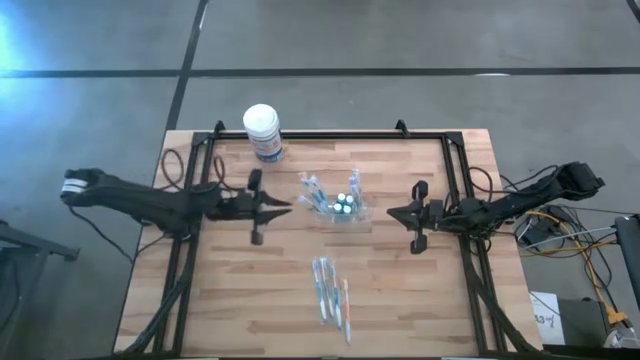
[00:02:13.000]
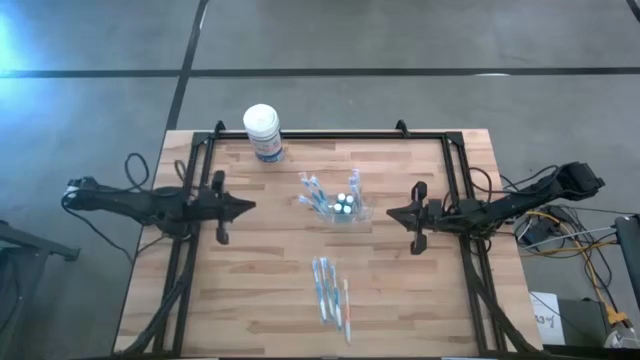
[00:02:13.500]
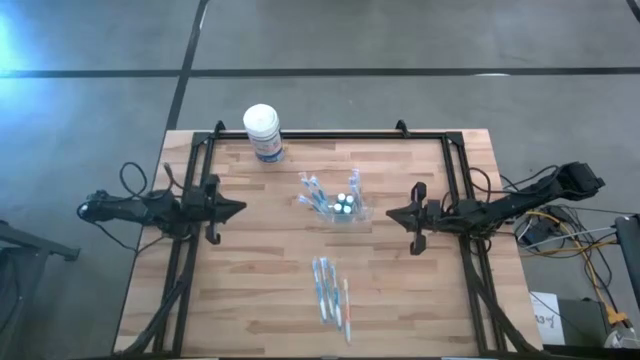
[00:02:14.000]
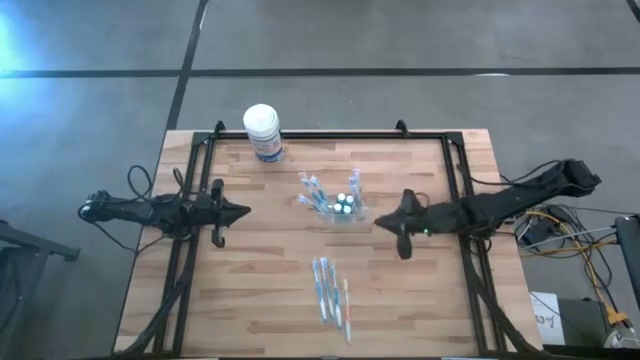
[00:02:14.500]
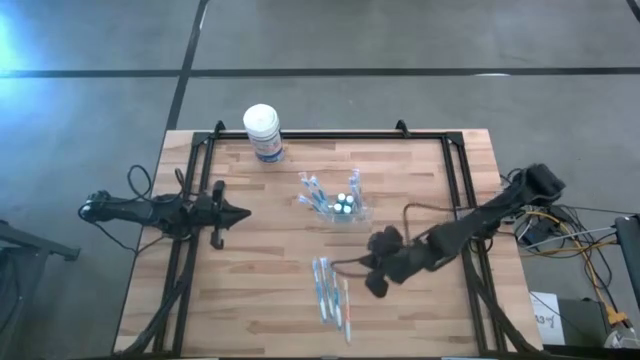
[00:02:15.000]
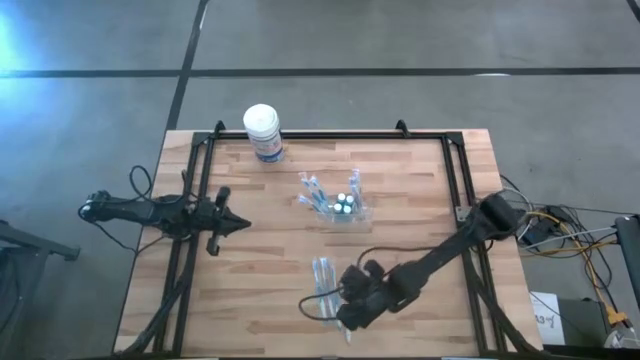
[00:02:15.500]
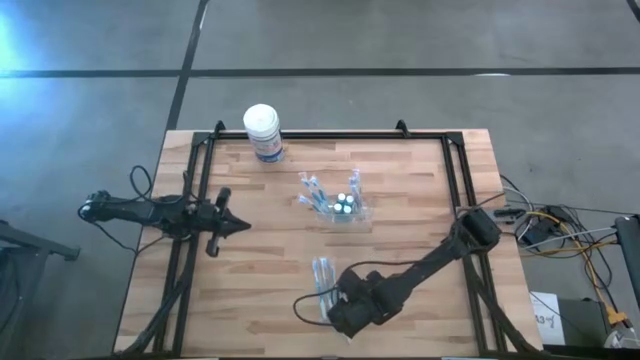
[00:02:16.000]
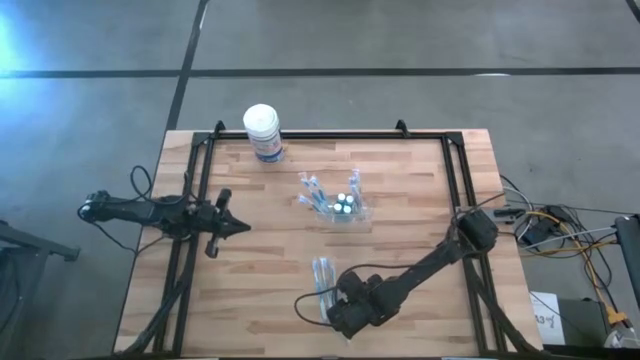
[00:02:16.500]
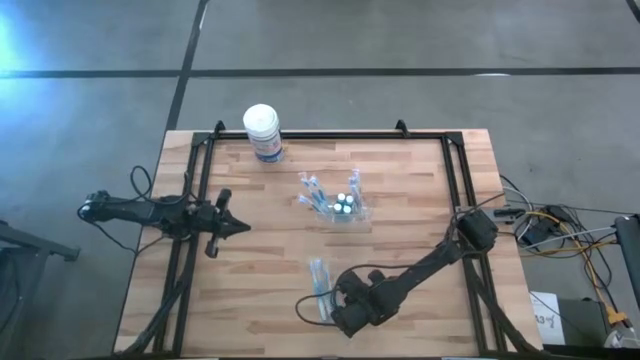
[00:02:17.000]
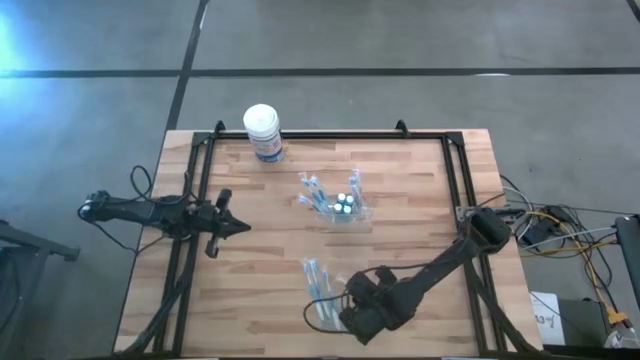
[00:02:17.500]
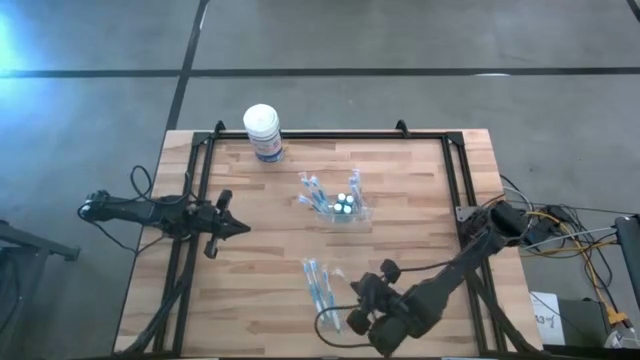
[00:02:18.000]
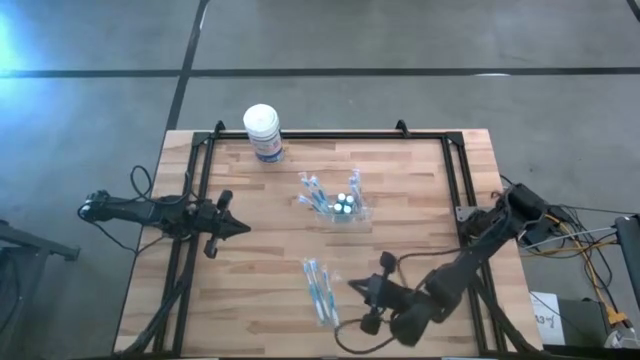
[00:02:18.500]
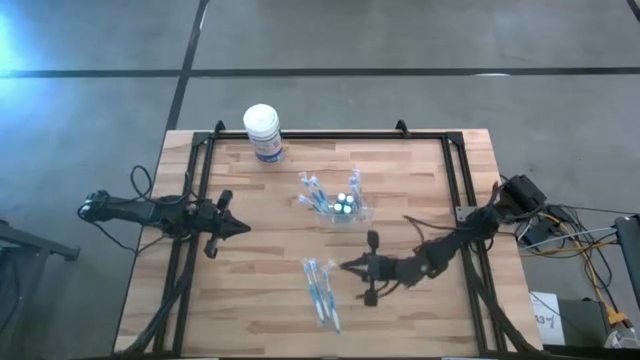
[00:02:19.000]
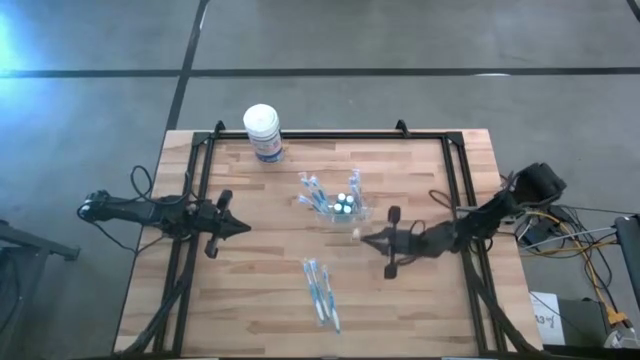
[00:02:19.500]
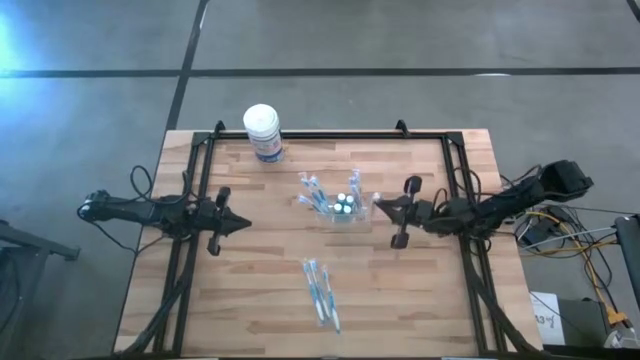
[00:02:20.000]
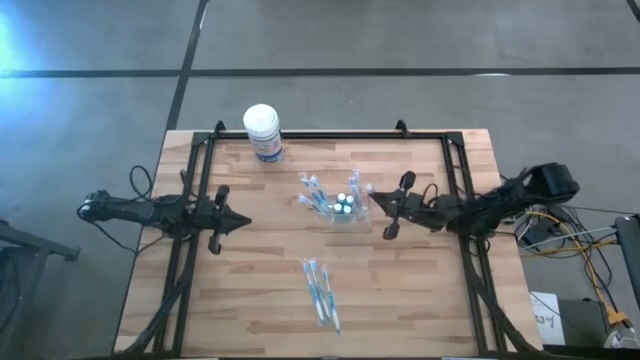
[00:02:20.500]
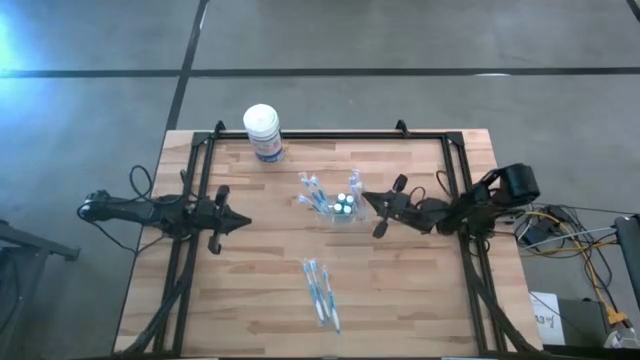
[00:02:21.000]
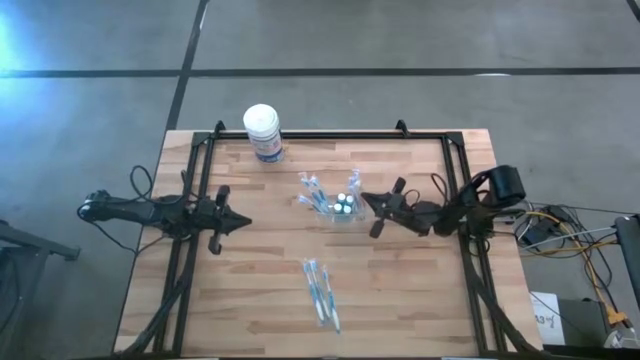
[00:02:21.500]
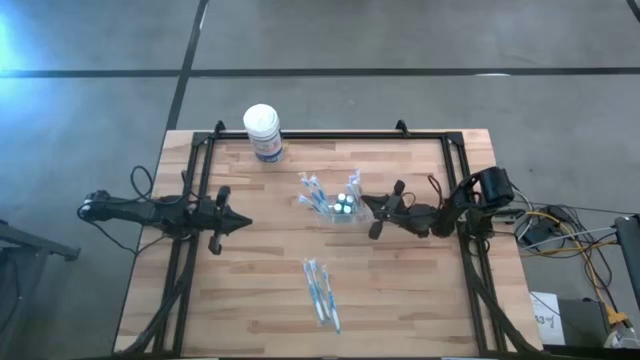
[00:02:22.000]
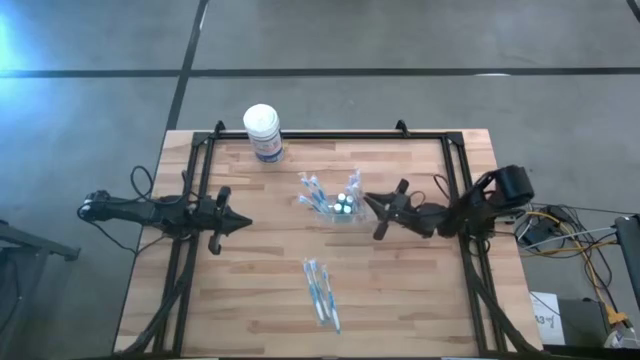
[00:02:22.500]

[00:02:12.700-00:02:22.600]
Task: Pick & Place toothbrushing station
Put the orange toothbrush into the transparent organizer

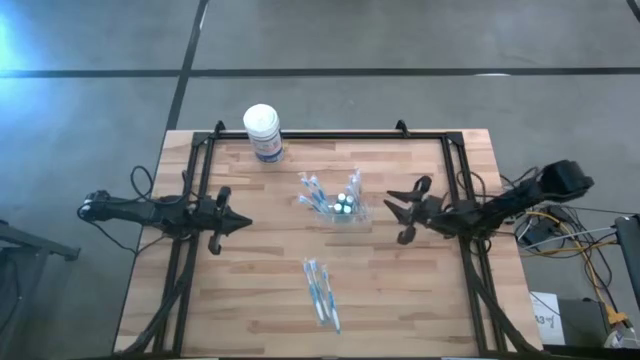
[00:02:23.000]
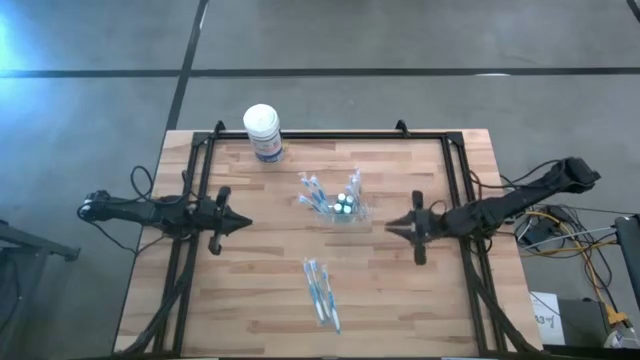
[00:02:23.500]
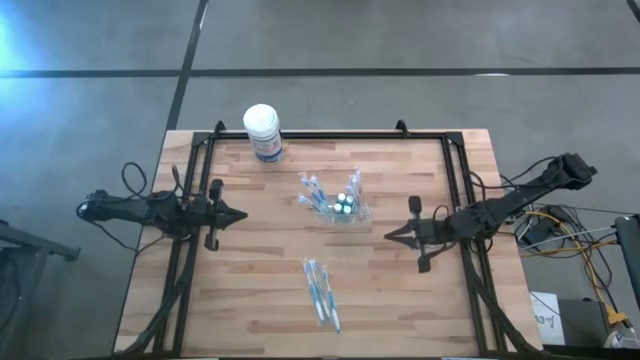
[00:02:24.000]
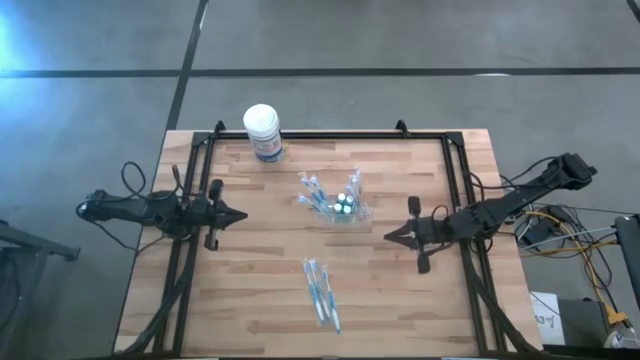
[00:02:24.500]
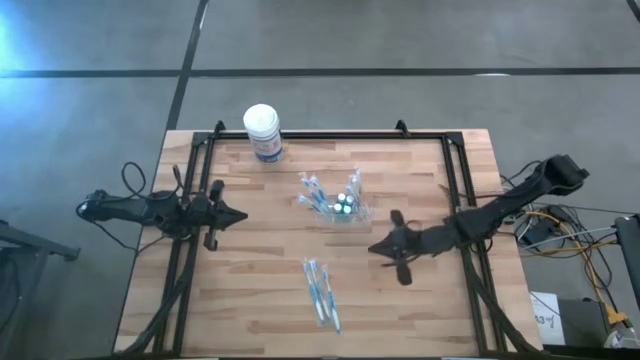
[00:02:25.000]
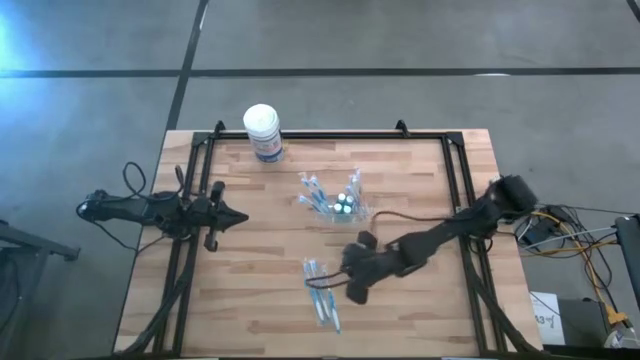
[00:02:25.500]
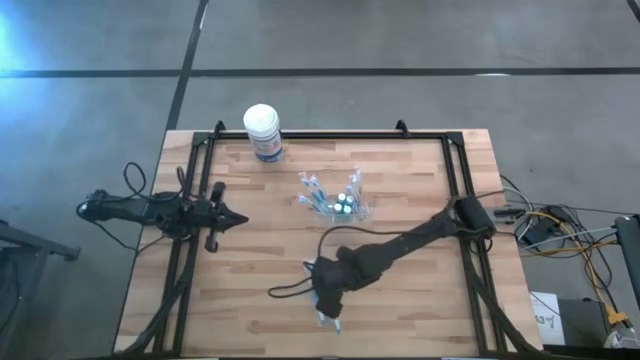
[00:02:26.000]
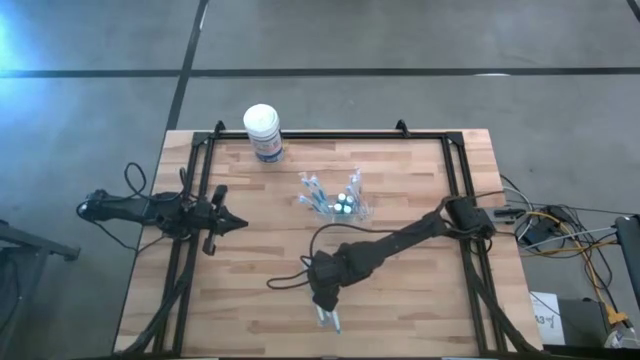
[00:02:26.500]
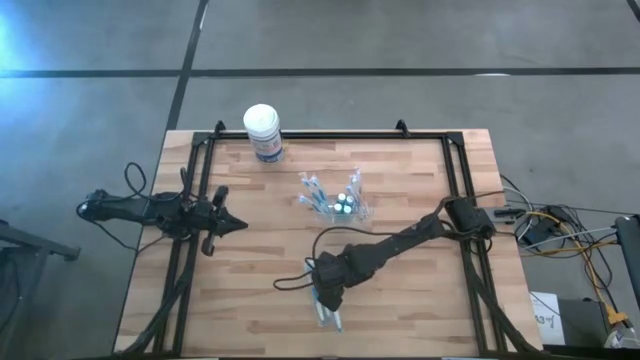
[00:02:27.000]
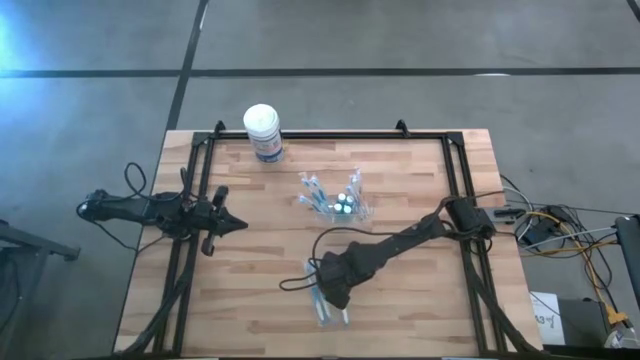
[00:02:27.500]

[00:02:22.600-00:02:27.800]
Put the blue toothbrush into the transparent organizer

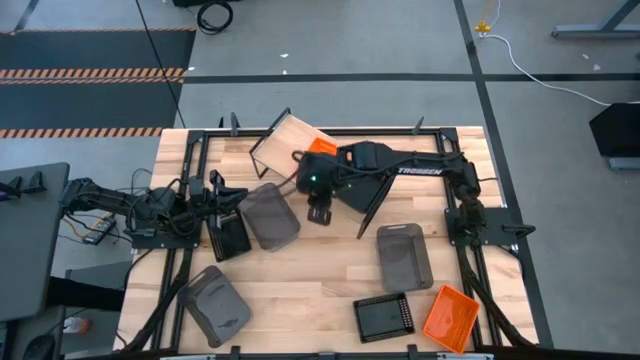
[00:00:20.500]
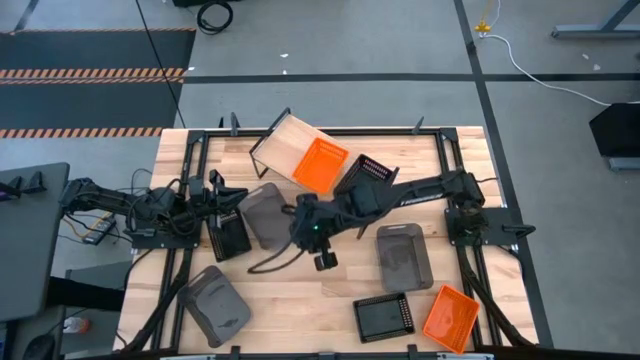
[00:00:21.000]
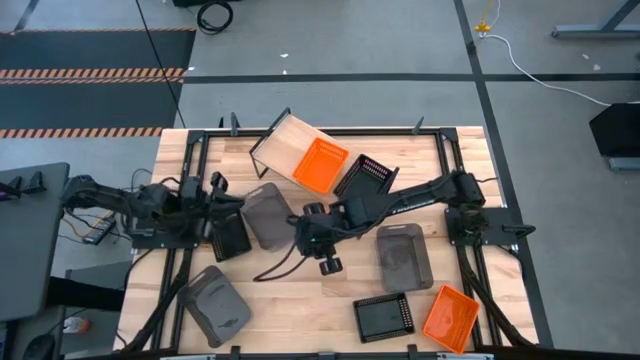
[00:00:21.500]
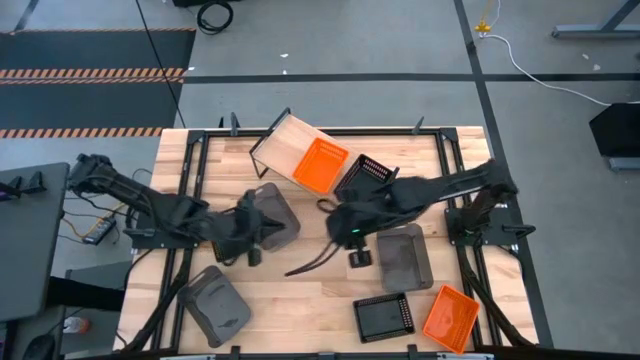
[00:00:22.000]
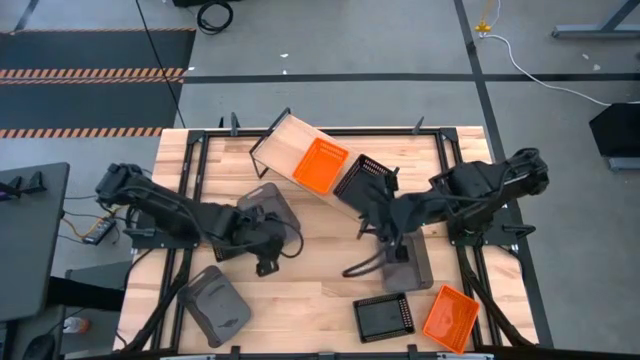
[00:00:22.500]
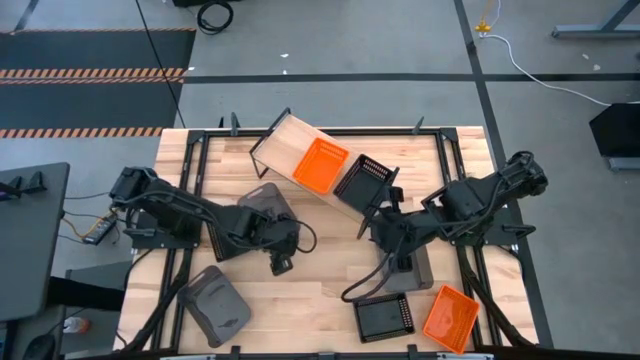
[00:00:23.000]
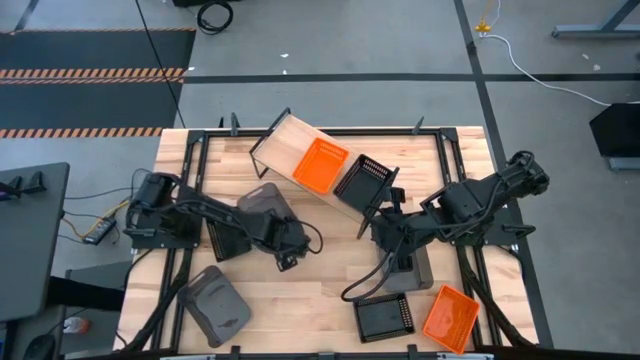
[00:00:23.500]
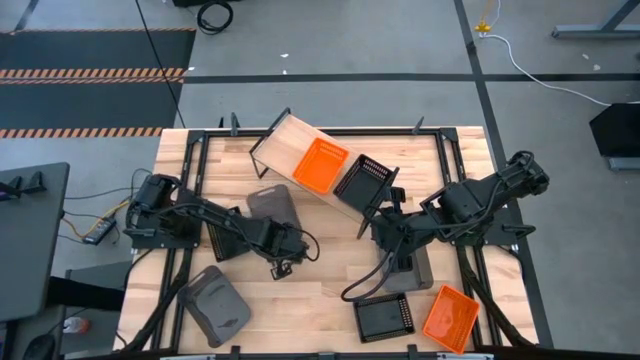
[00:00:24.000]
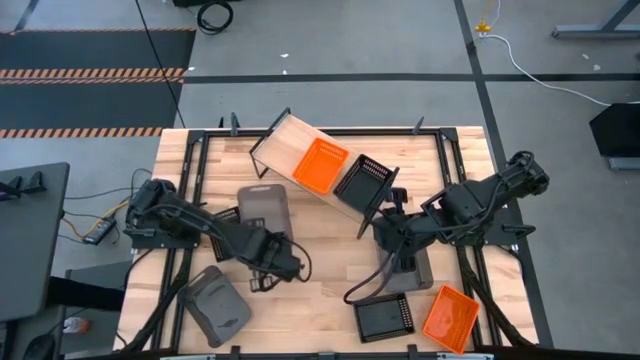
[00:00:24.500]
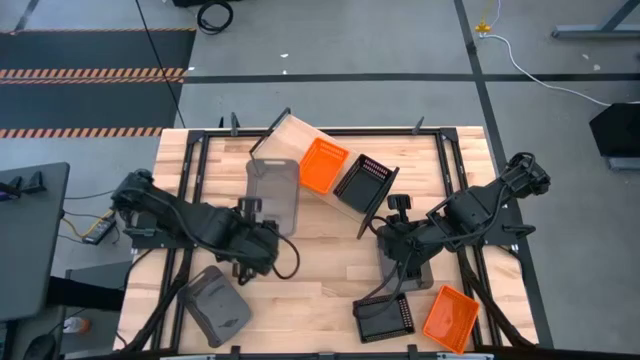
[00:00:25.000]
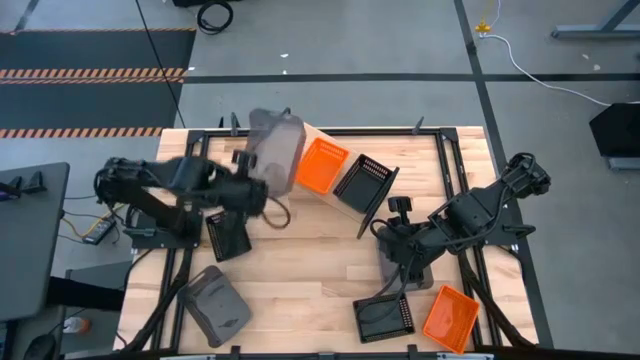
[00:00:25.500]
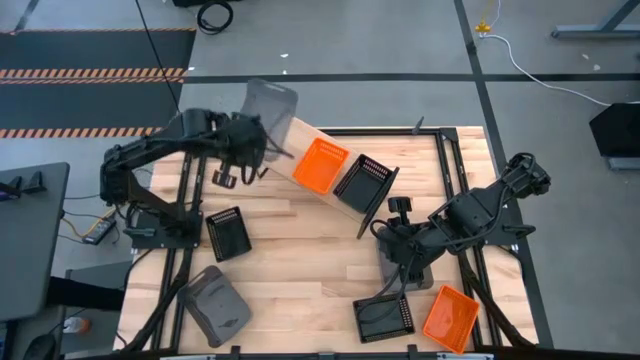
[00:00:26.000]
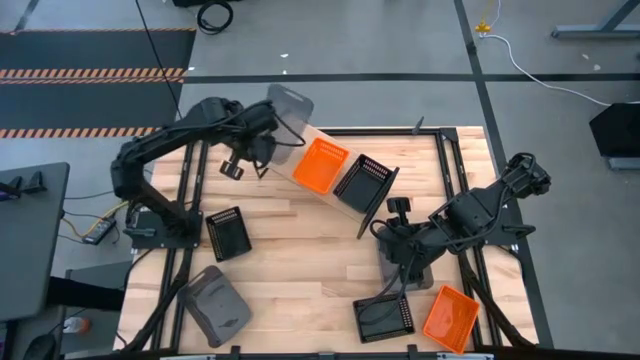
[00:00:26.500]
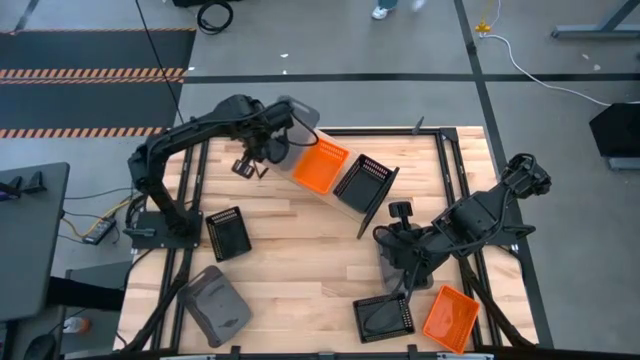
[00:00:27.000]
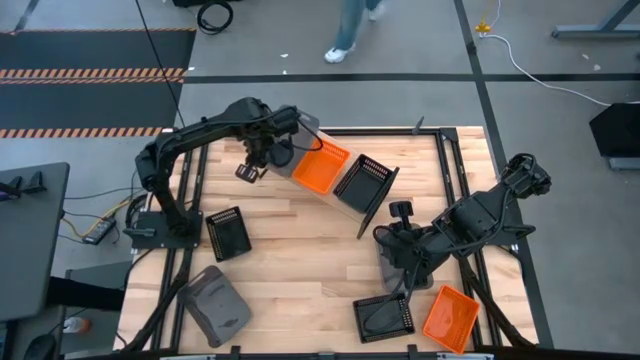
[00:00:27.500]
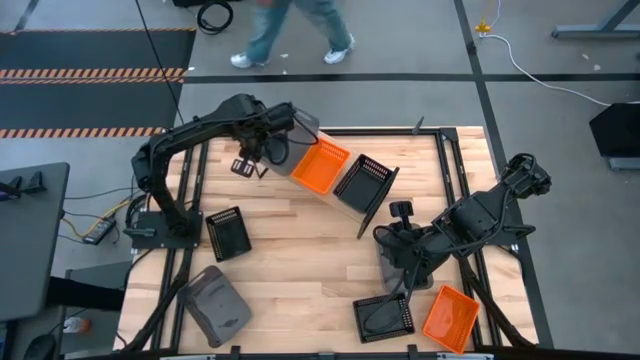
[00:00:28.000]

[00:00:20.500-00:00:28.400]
Task: Stack baskets on shelf by color
Put the top black bin on the shelf
